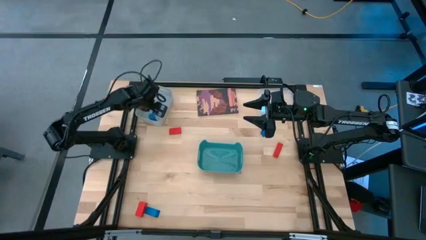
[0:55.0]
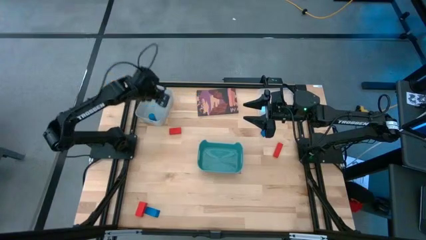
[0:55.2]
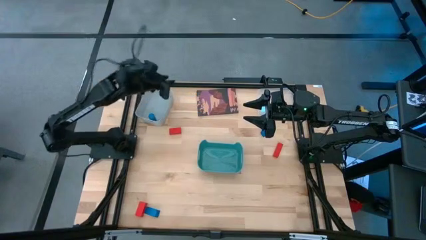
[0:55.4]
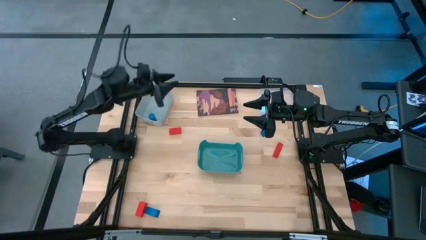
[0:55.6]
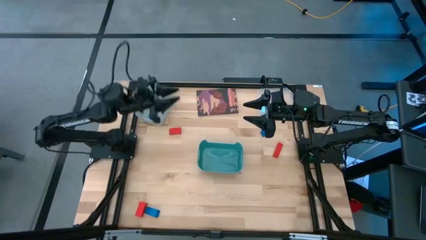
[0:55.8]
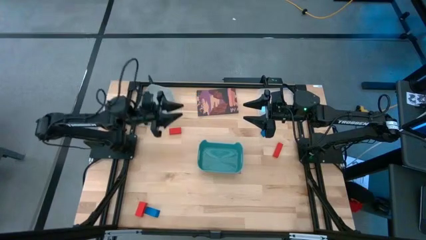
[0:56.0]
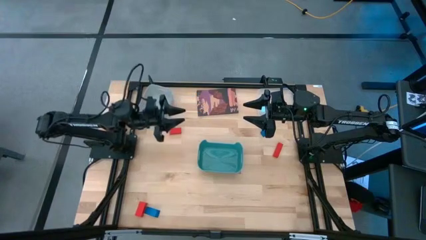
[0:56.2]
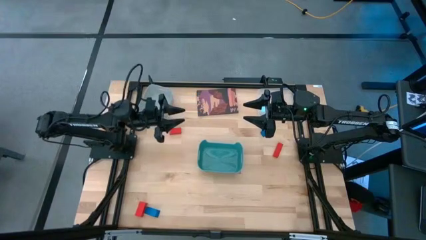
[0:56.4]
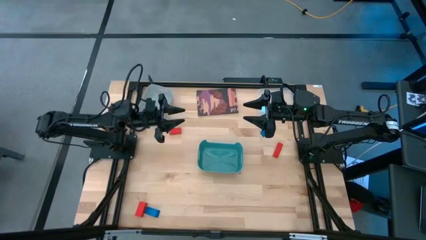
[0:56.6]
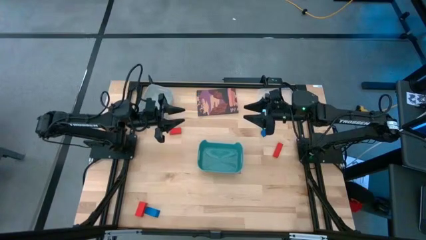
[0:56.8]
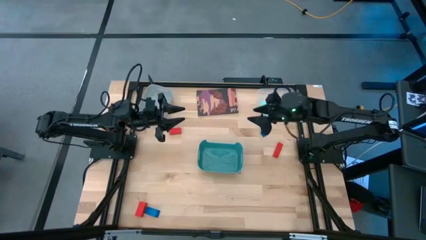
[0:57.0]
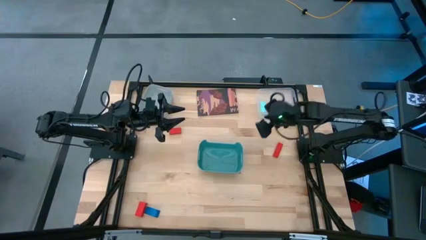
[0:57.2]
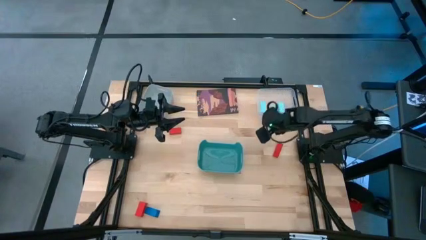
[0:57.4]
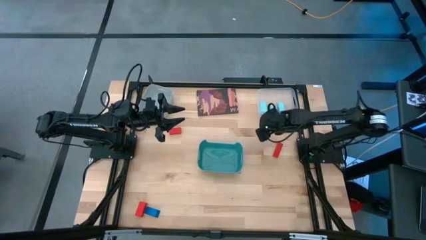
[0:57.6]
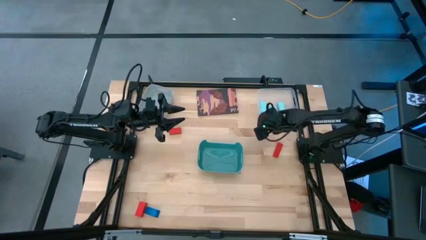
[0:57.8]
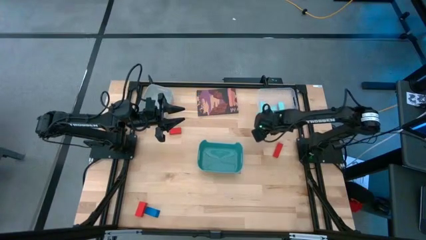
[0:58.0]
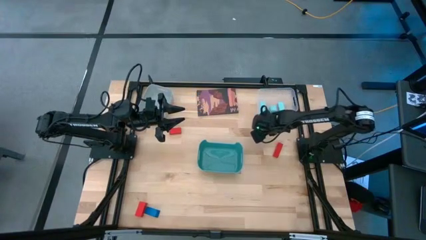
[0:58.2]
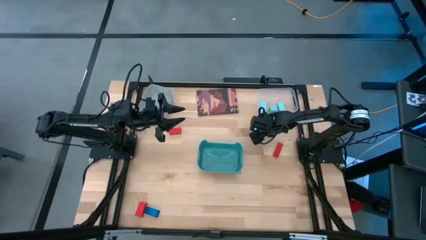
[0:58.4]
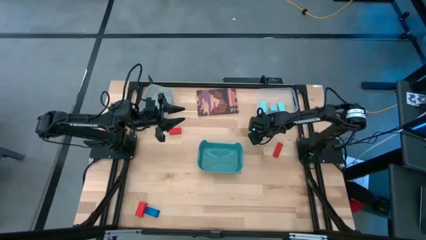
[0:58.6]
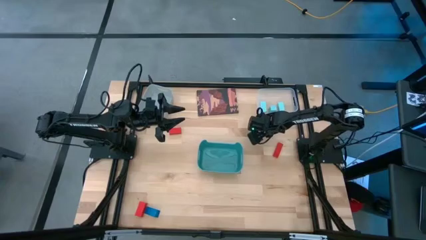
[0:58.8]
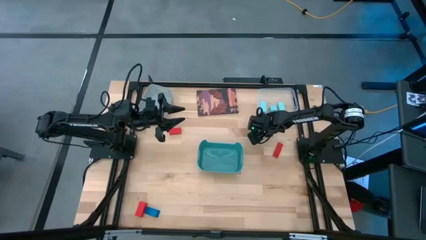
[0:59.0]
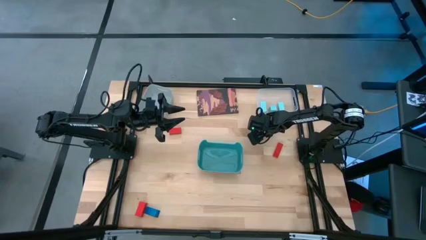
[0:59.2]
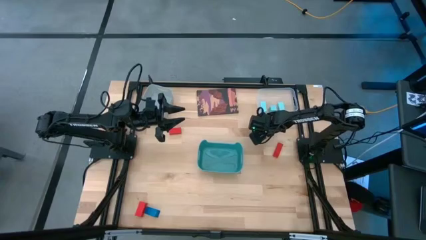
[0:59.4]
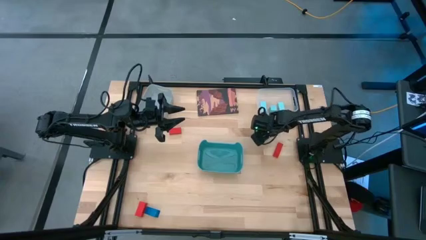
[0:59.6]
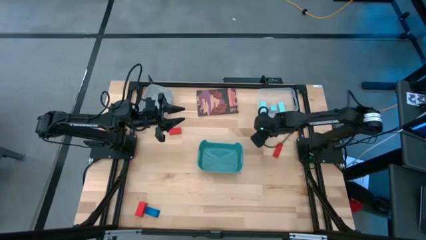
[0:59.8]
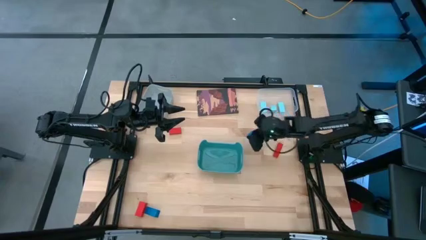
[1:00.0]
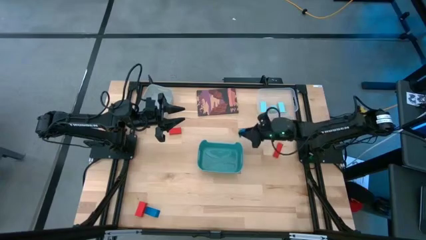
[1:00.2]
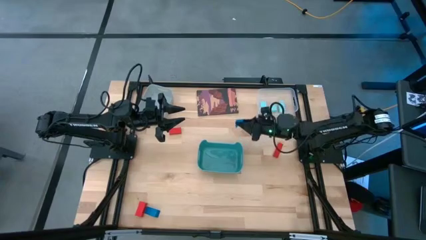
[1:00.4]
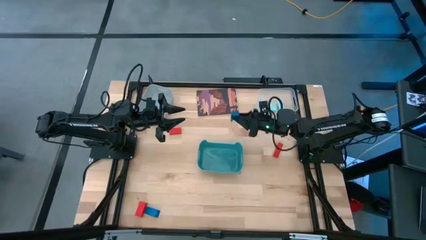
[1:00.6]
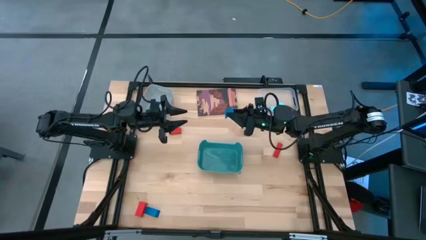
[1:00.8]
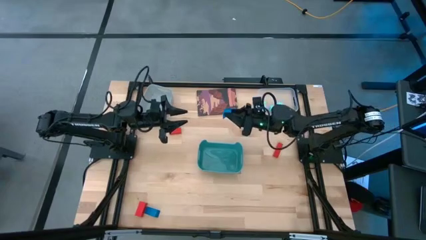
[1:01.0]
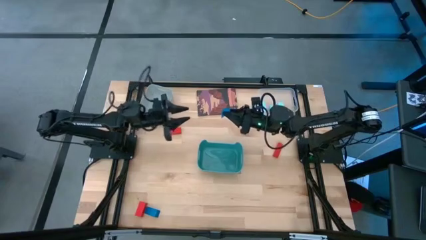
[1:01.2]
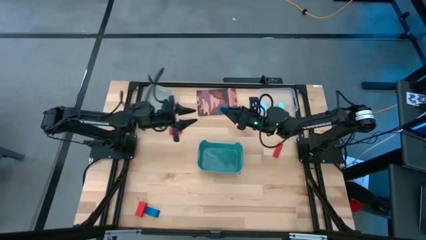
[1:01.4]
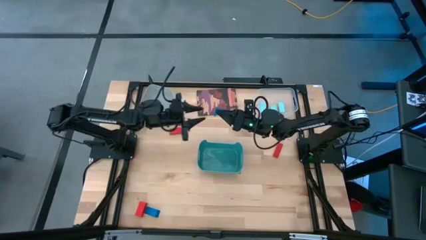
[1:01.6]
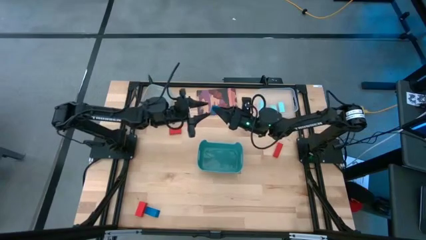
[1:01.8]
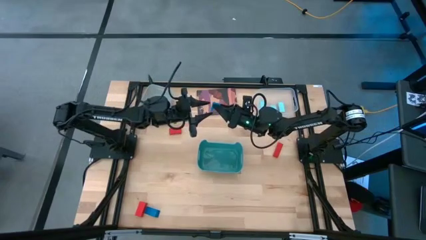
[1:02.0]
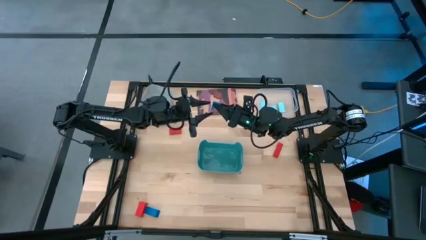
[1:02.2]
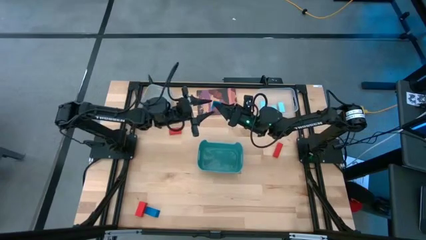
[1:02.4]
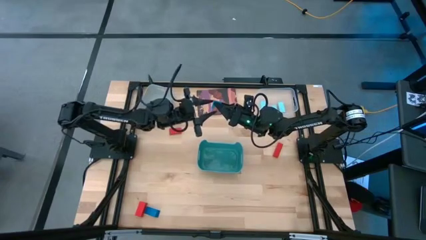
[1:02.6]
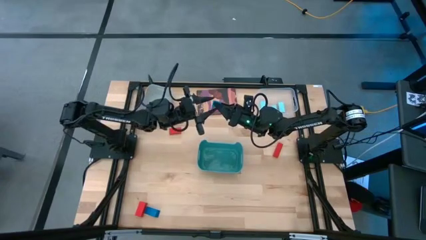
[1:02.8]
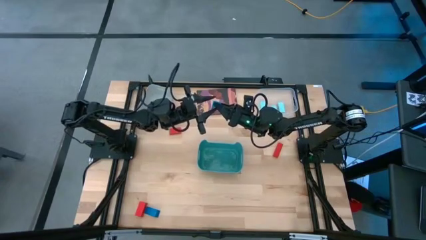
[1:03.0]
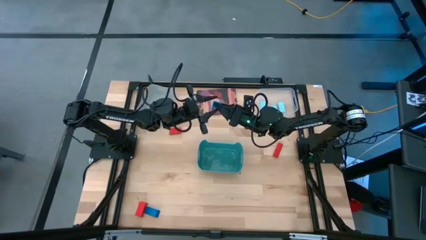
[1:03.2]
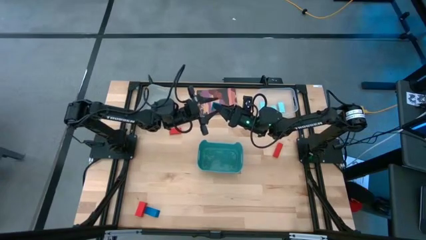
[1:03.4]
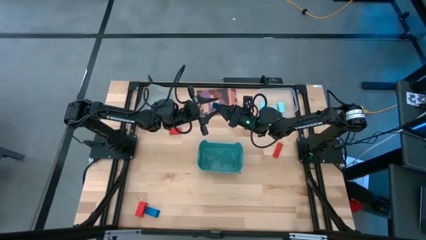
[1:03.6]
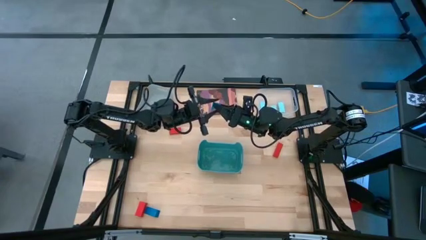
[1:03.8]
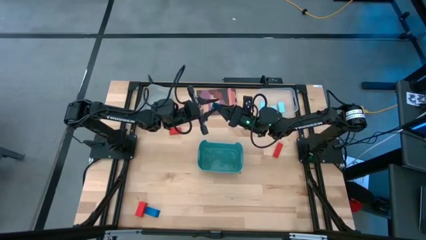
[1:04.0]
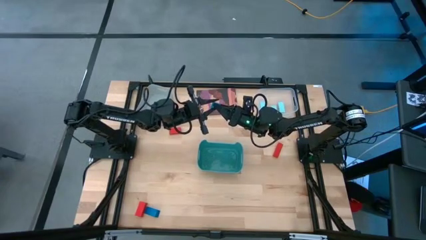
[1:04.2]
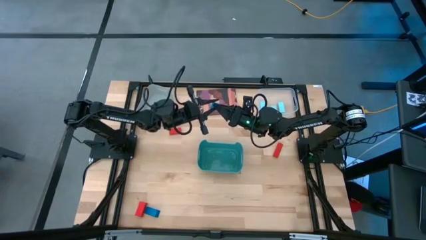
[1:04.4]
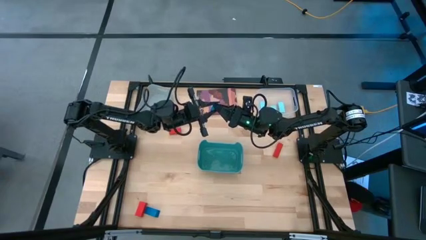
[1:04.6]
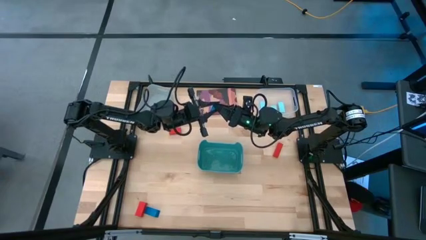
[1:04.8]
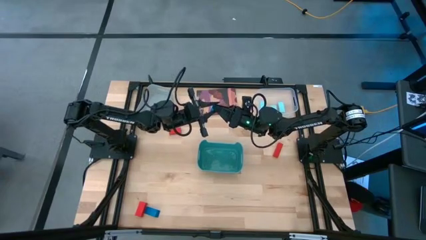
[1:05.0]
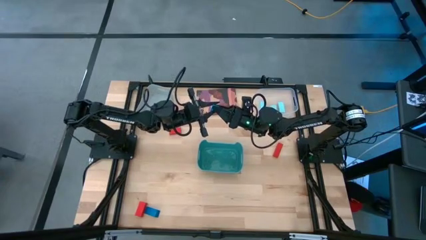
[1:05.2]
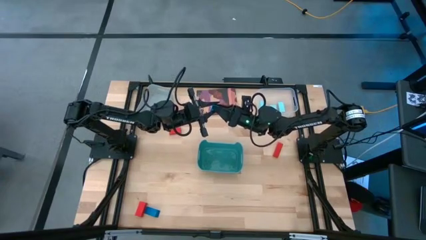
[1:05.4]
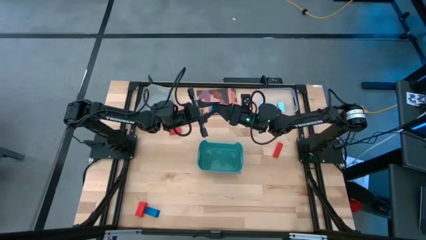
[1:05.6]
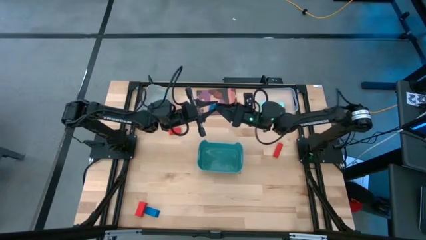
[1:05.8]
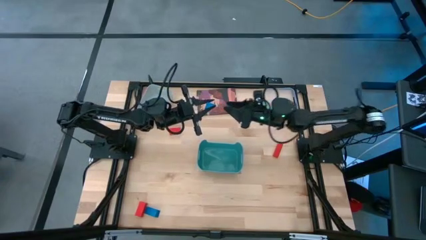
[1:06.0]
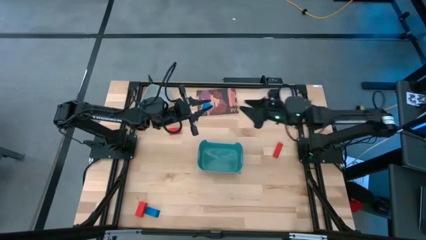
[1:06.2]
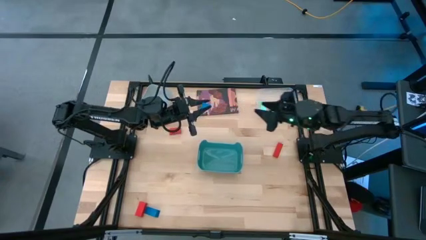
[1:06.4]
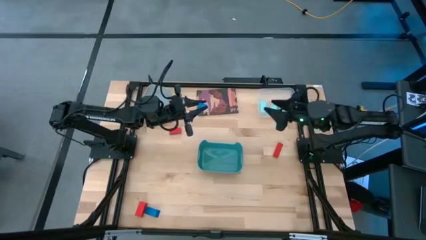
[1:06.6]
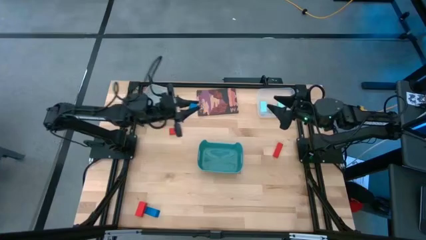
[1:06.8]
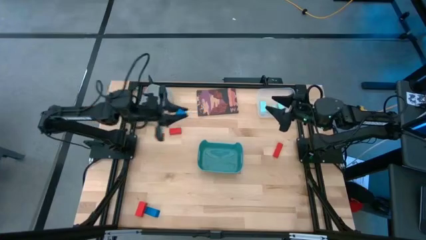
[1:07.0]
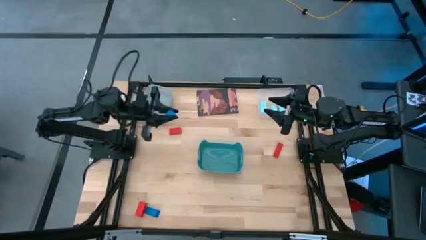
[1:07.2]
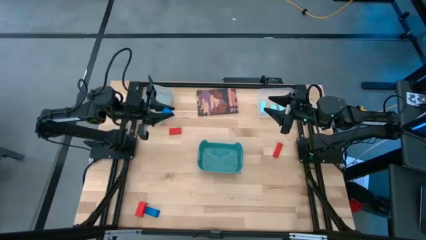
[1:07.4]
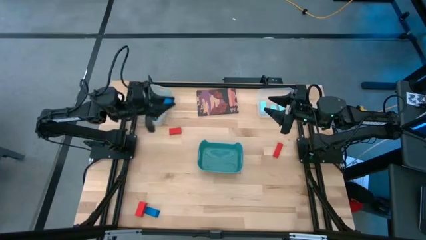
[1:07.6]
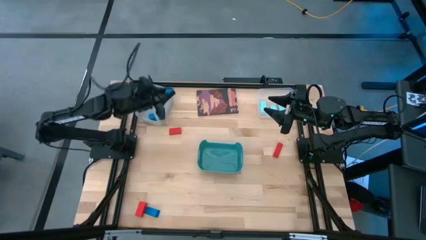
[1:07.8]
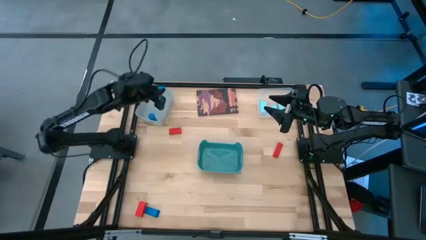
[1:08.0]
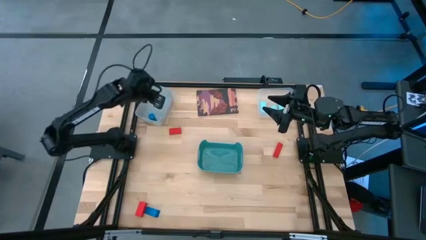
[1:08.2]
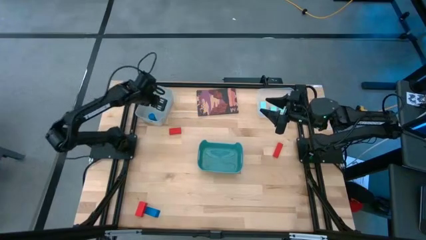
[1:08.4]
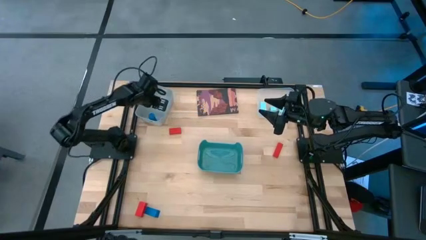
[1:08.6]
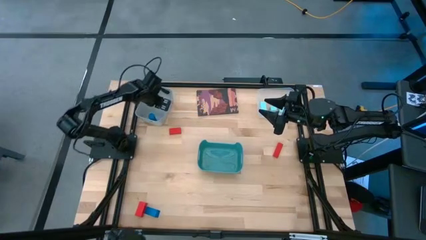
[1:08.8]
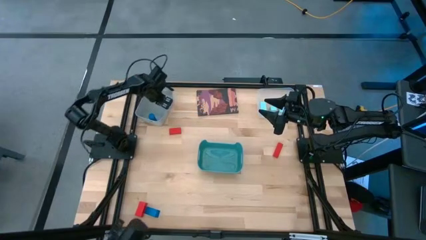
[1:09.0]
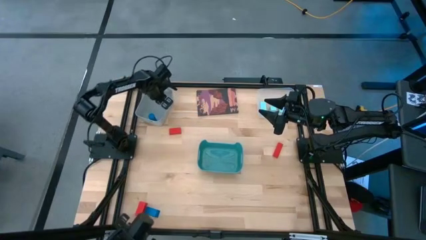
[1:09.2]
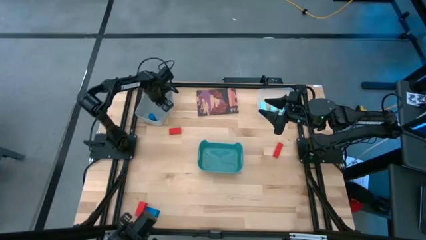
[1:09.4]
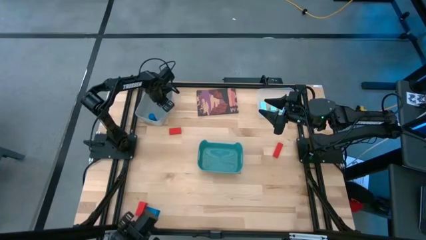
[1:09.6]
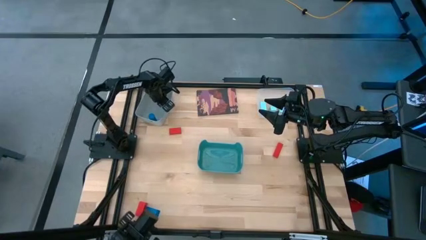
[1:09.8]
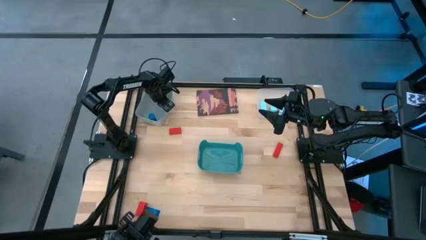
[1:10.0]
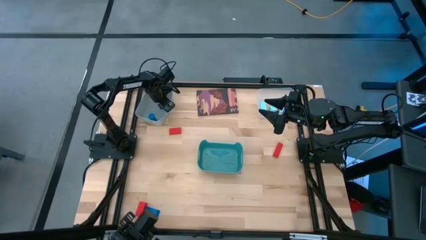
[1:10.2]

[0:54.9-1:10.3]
Task: Sort & place blocks by color
Put the top triangular blue block into the white bin
